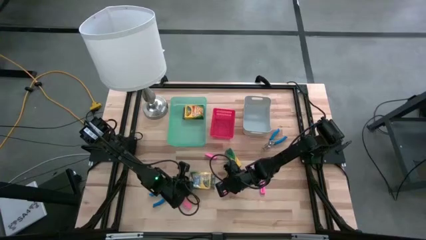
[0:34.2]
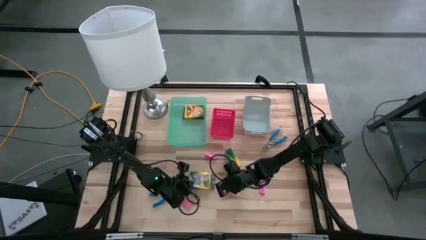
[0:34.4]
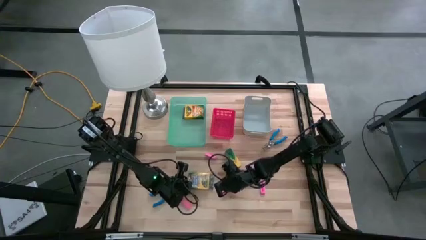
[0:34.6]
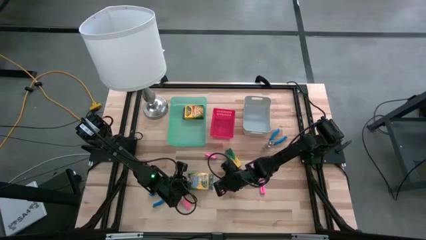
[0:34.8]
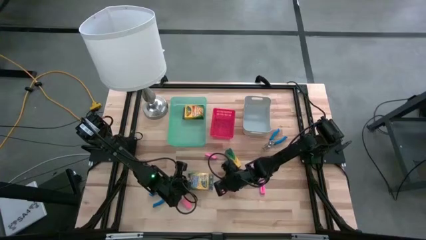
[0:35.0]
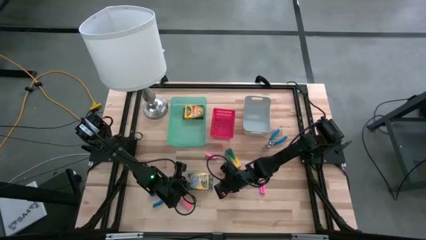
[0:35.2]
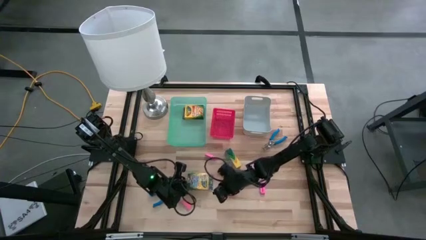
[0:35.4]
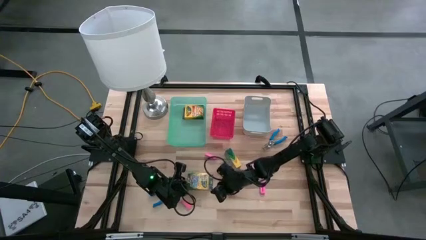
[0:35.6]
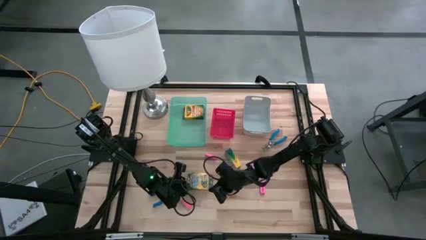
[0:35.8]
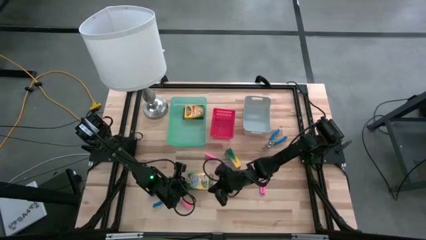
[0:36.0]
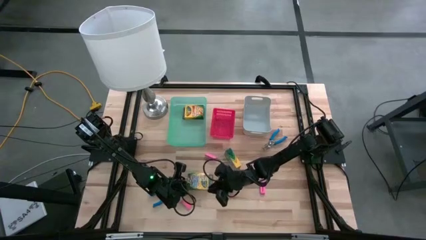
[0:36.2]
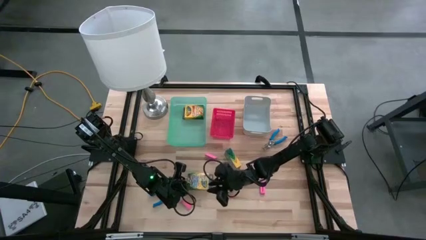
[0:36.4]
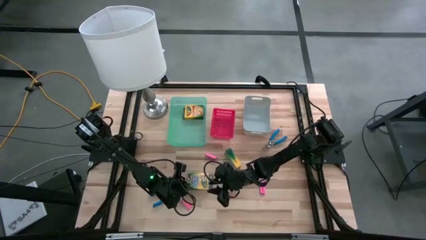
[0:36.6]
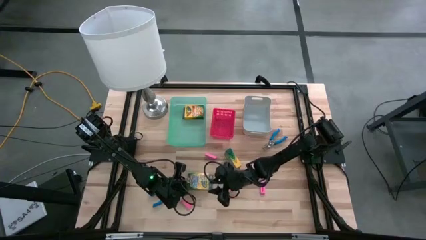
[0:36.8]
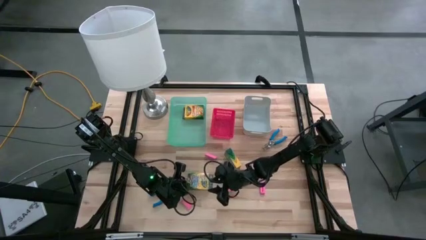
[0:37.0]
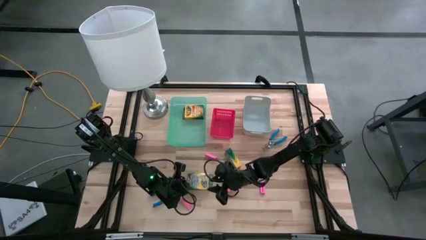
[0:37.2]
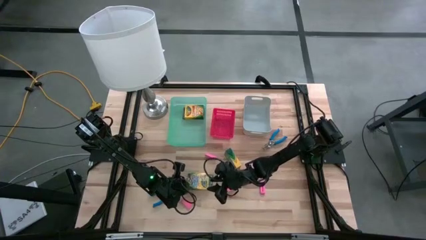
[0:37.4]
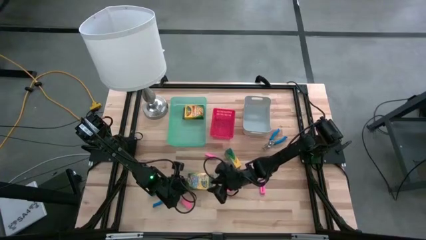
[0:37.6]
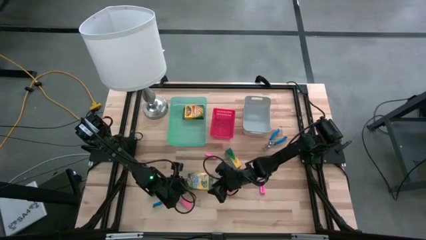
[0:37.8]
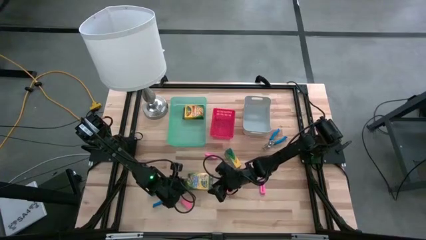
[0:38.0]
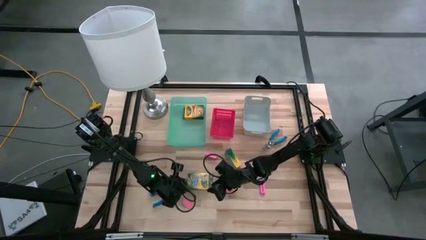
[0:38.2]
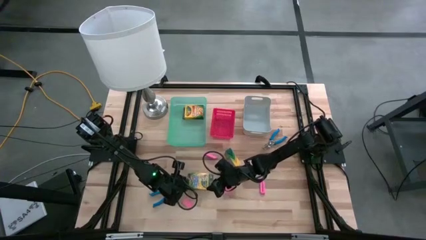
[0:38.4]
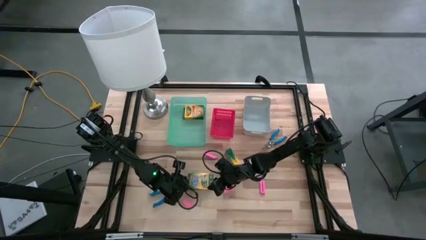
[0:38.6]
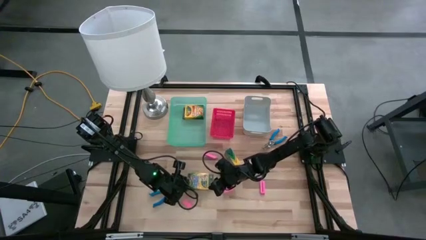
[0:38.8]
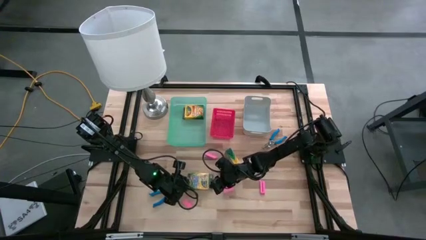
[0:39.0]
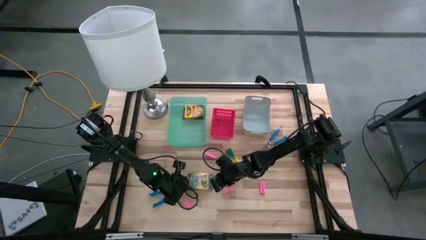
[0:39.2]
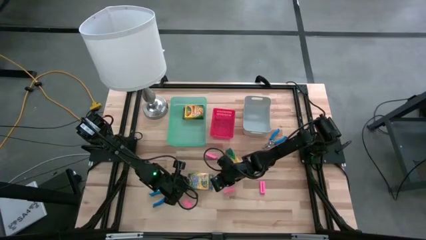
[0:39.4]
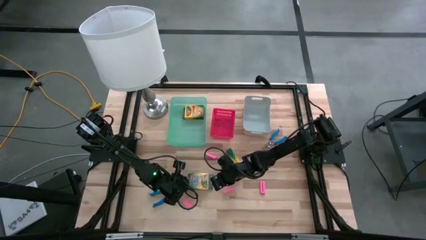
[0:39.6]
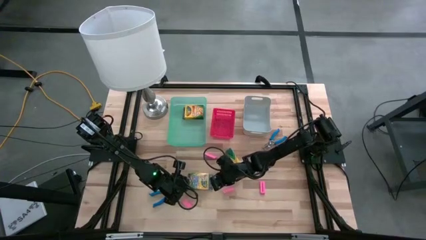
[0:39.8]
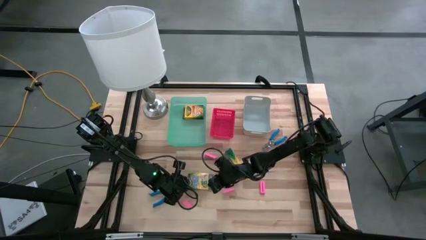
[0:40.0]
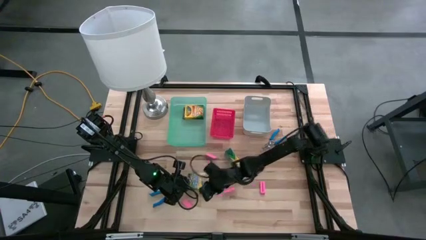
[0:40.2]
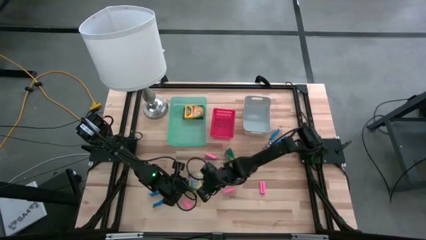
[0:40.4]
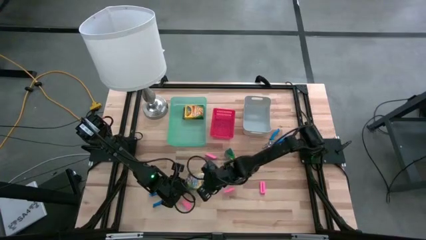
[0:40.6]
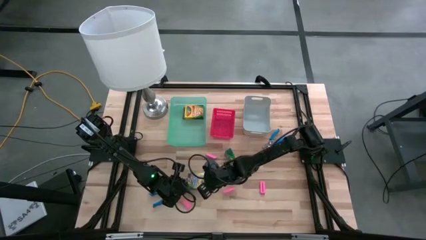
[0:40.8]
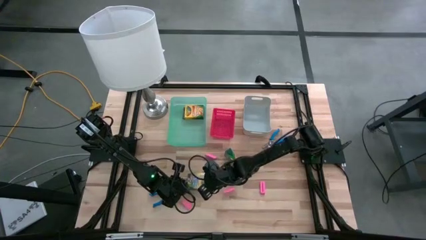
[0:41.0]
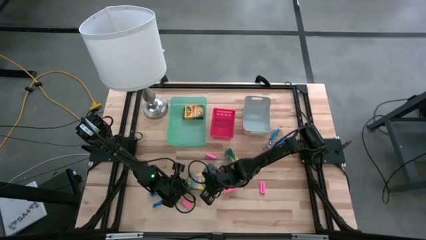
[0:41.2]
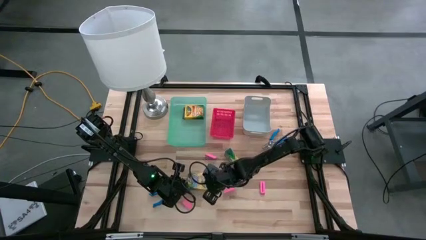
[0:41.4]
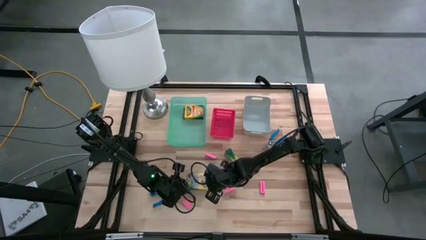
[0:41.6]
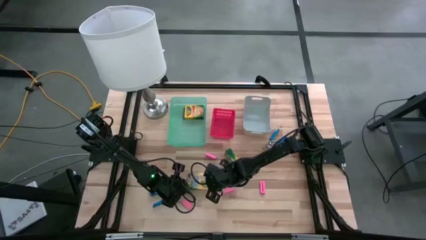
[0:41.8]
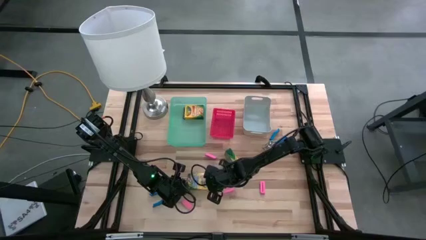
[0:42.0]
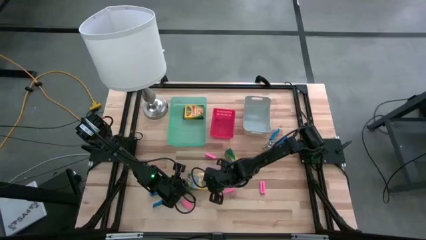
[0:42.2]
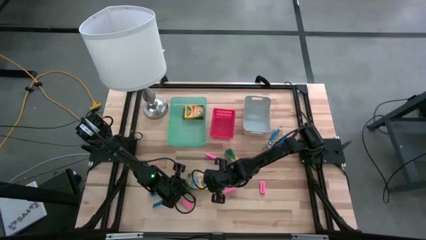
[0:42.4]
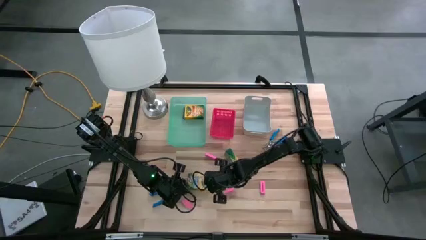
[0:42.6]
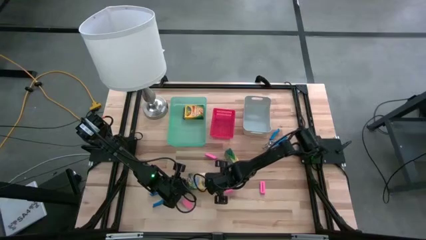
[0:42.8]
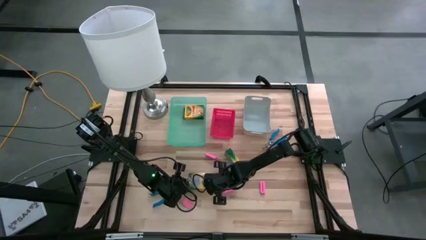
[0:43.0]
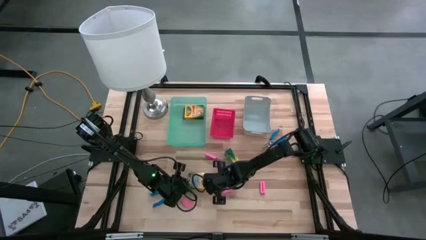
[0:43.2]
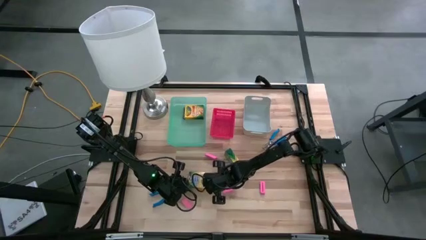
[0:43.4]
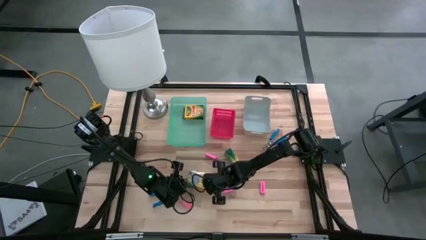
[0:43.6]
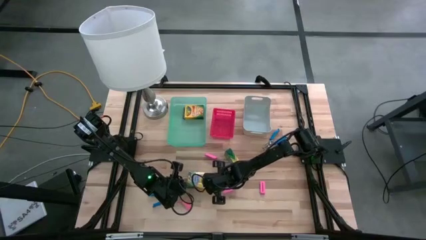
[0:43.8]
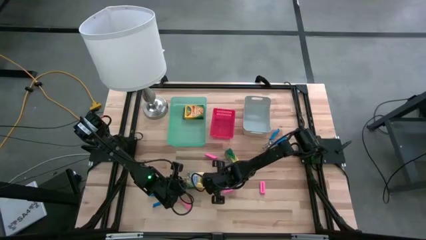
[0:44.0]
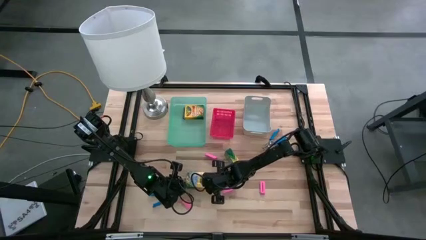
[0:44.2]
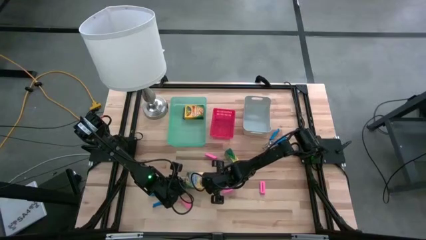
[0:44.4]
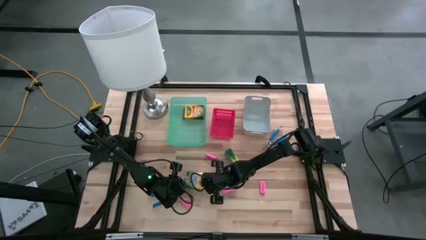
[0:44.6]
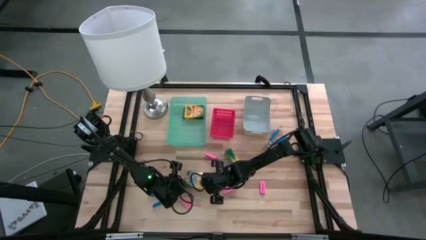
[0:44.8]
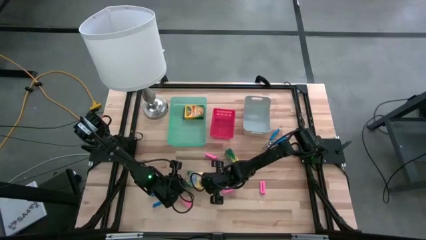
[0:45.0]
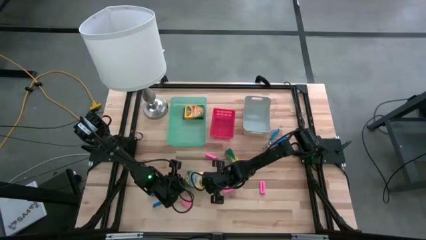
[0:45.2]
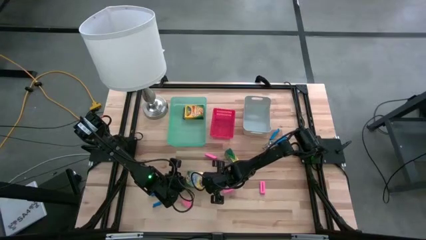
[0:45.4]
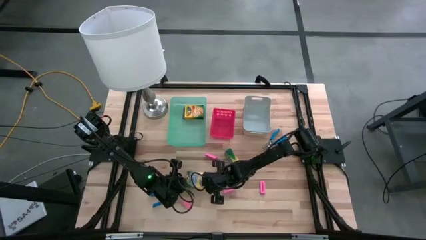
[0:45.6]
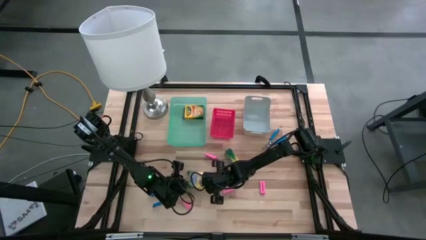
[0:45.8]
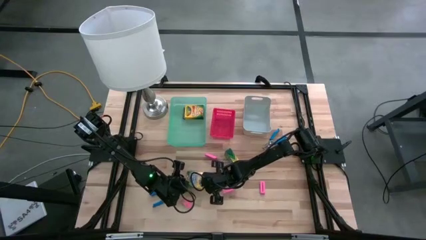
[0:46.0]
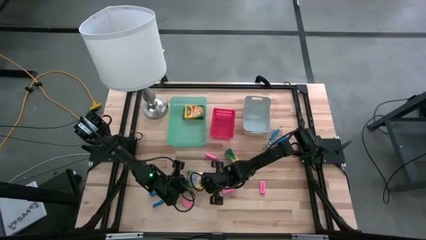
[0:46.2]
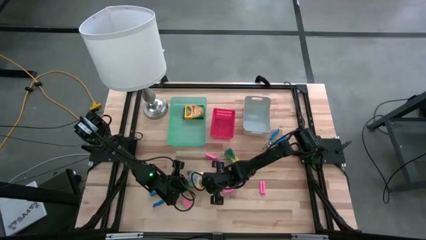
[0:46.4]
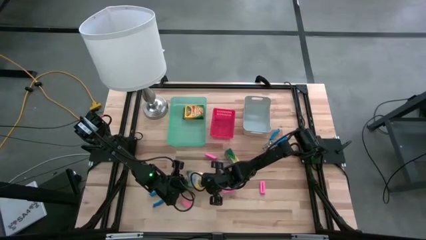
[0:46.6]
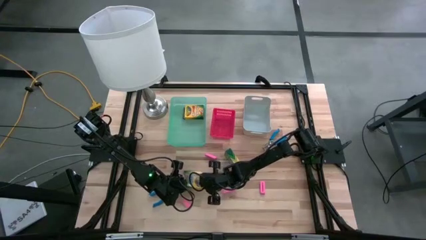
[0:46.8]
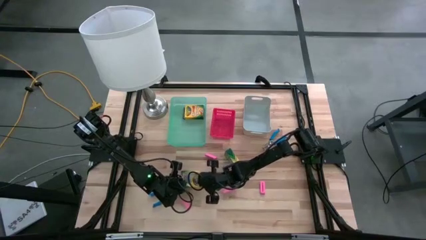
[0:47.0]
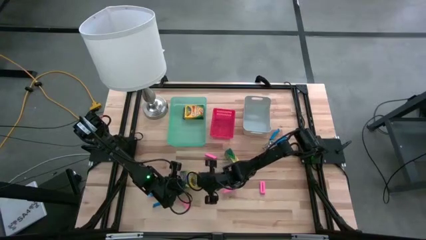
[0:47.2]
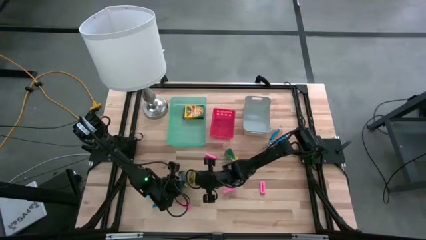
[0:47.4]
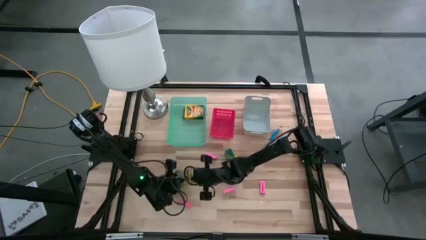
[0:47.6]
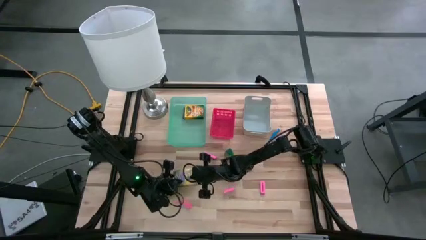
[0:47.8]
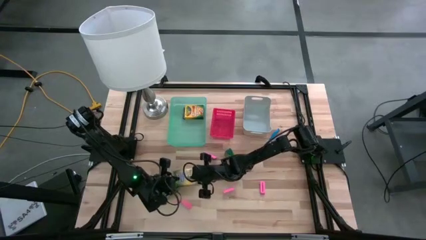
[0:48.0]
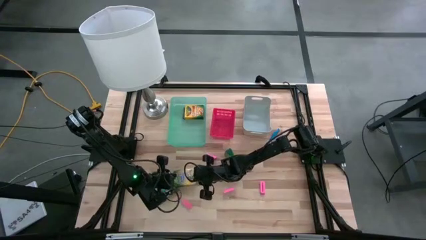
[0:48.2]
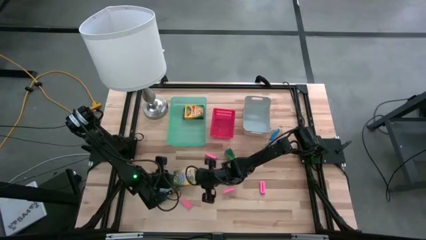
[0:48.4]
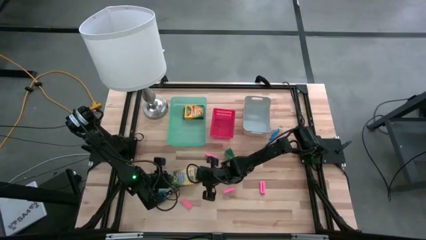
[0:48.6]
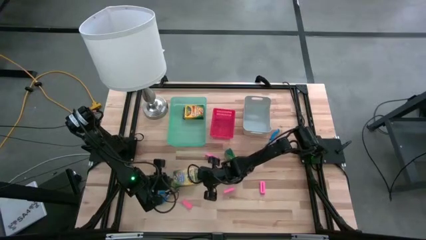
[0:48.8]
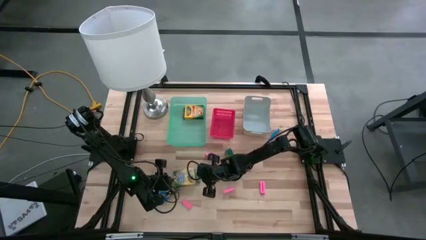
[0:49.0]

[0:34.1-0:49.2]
Task: Pick & Place School Supplies
Put the yellow crayon box into the green bin
